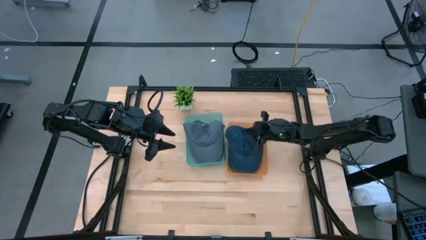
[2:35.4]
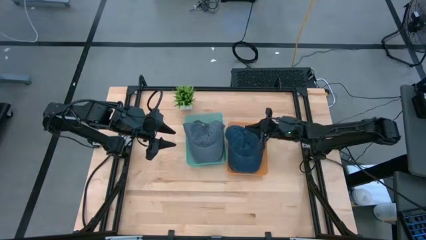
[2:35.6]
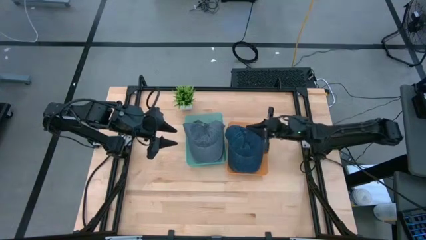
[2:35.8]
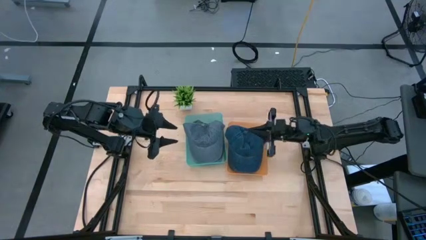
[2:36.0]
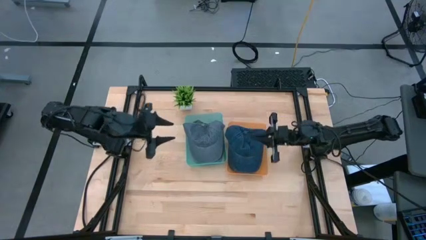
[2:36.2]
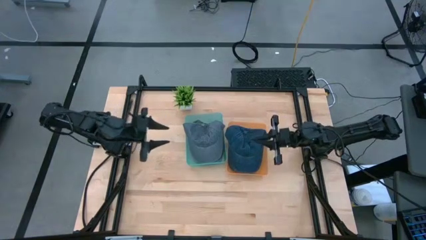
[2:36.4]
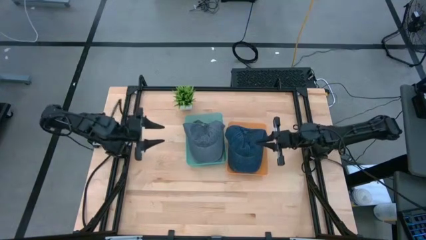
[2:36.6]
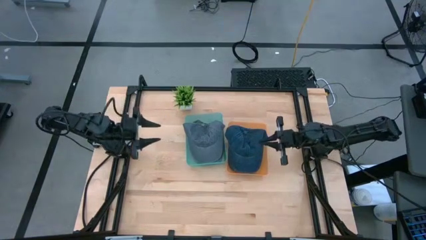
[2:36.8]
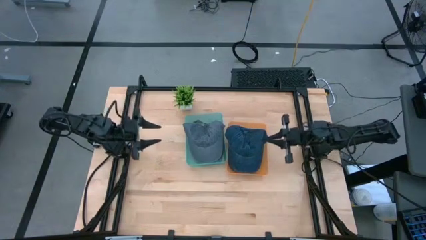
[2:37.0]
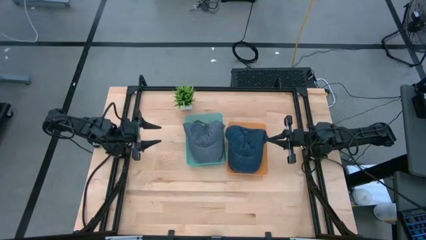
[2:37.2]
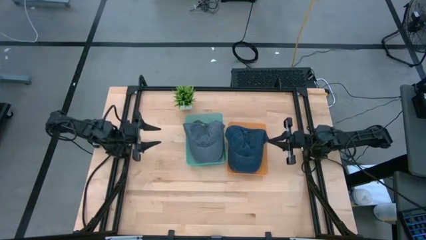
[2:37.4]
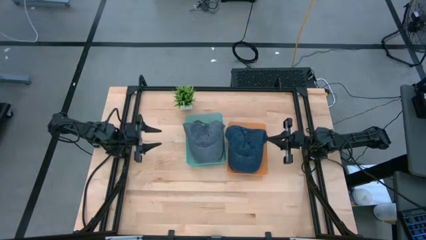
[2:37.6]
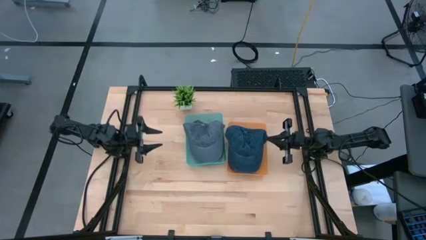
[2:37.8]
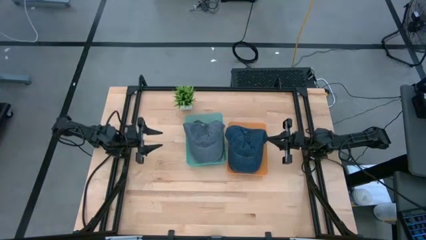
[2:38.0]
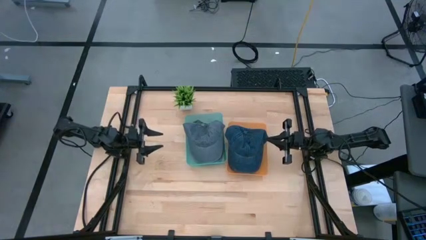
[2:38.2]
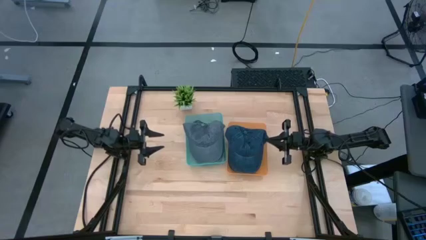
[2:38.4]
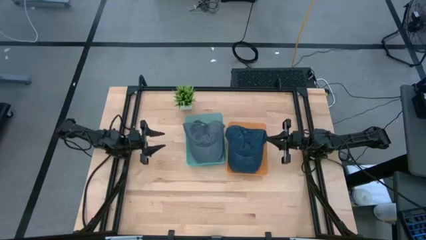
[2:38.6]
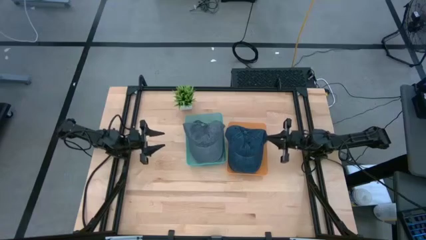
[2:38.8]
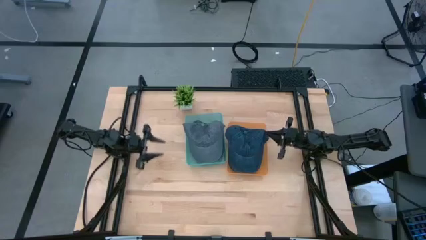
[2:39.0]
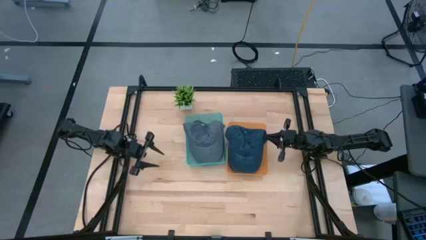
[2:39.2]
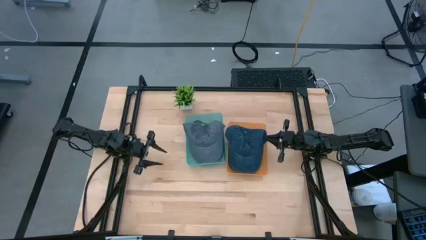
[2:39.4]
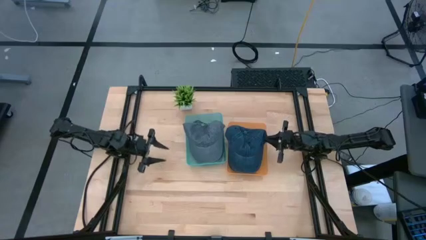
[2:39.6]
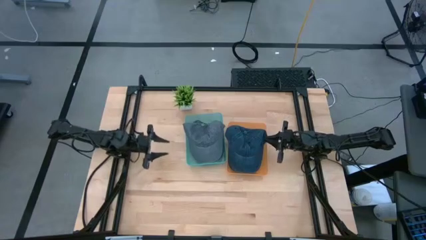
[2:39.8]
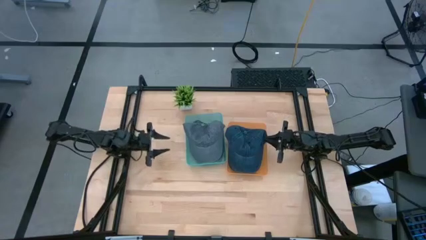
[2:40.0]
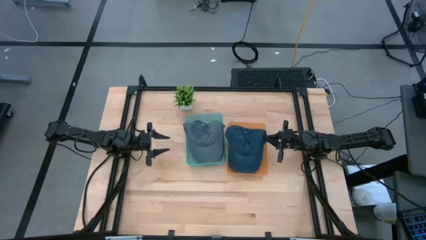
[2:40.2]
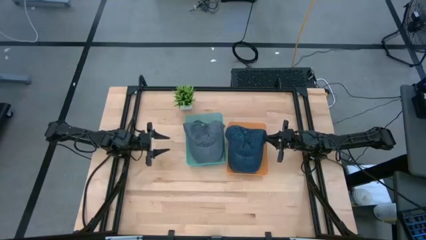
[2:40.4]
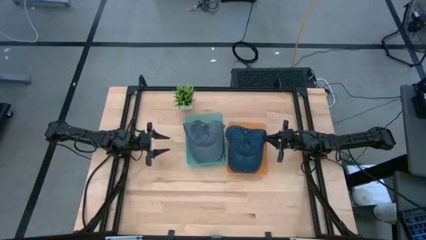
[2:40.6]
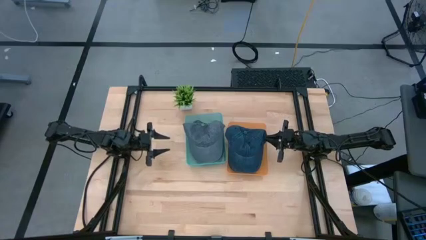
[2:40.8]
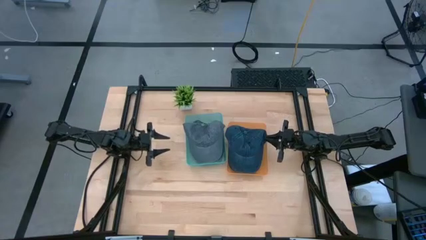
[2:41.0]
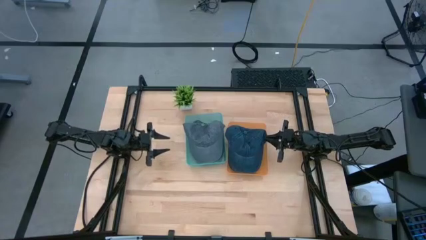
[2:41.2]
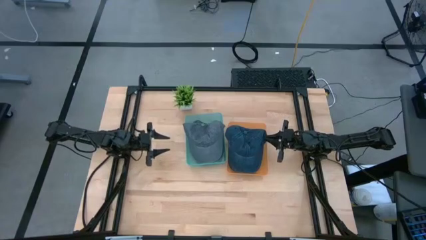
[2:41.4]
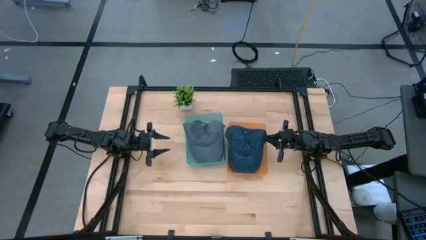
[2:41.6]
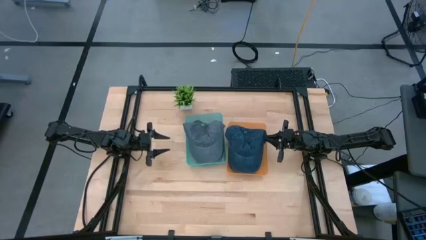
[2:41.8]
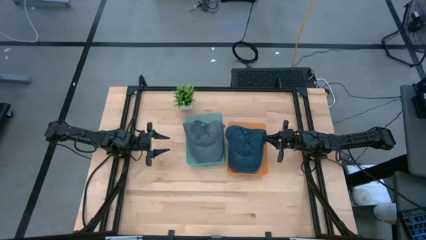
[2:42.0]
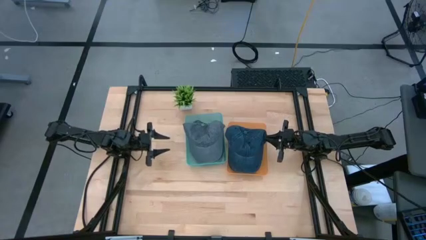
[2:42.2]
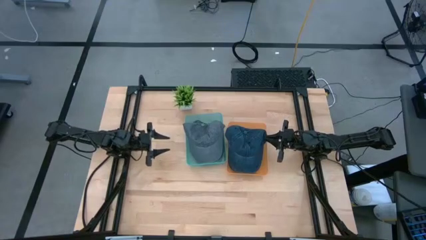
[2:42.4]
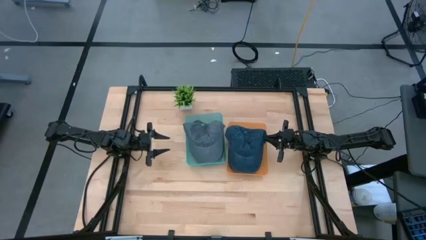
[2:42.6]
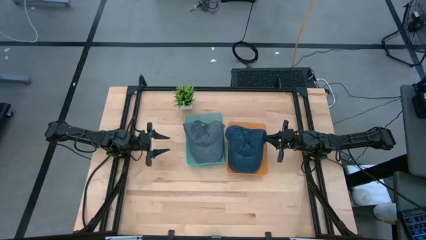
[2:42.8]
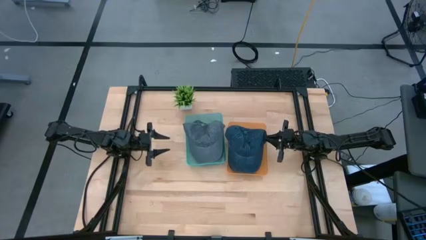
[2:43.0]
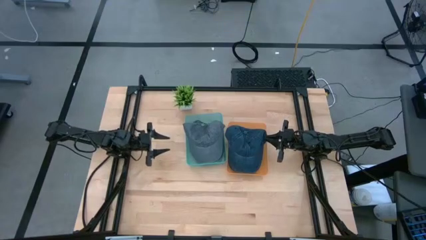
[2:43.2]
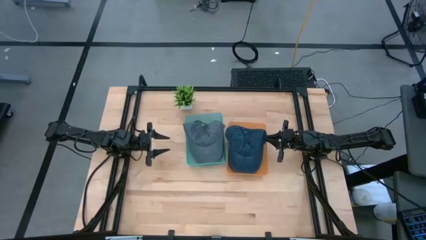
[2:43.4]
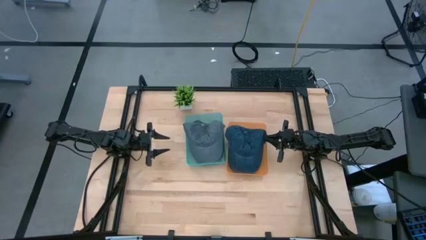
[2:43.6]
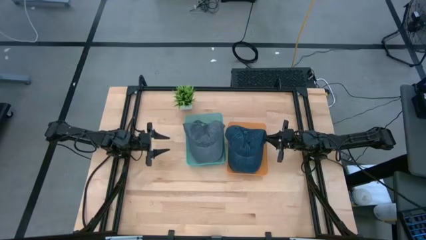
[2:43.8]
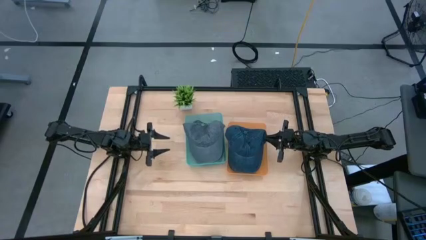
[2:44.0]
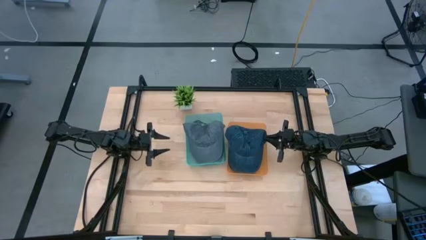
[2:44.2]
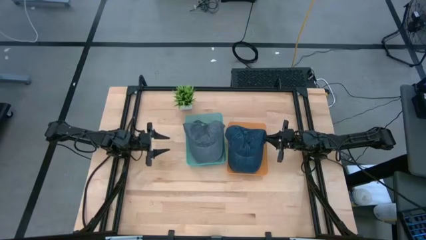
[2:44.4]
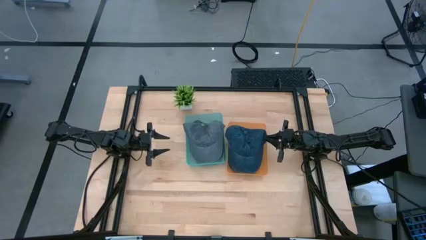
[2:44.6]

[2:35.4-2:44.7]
Task: Pick & Place hat
Return to Home Position

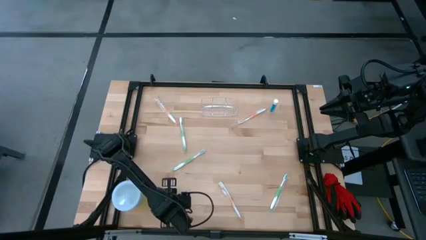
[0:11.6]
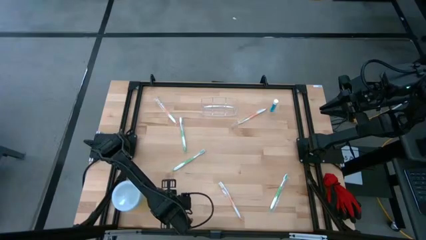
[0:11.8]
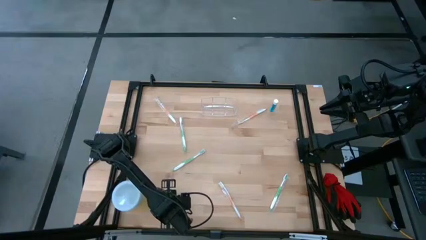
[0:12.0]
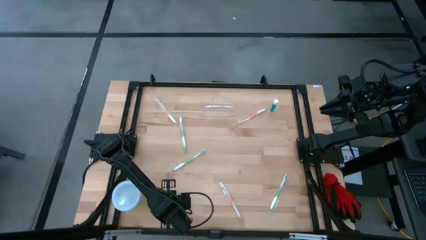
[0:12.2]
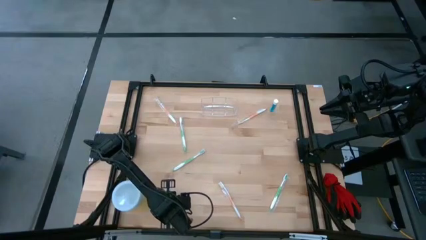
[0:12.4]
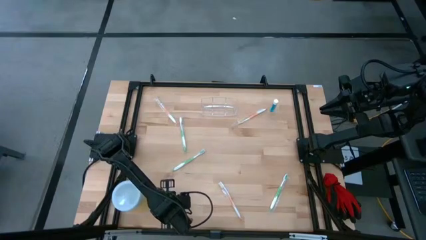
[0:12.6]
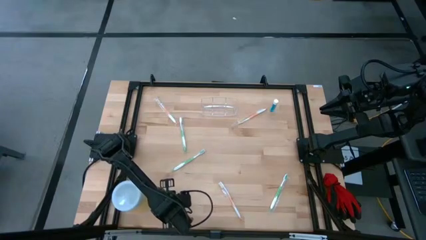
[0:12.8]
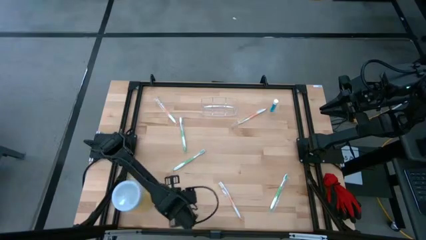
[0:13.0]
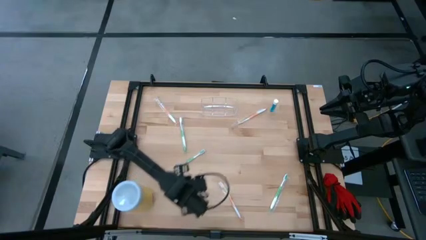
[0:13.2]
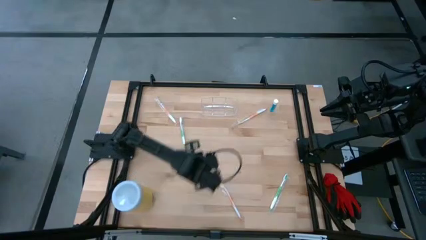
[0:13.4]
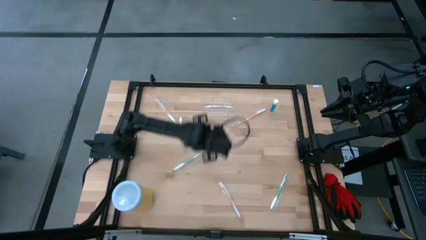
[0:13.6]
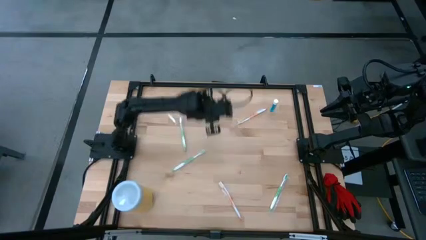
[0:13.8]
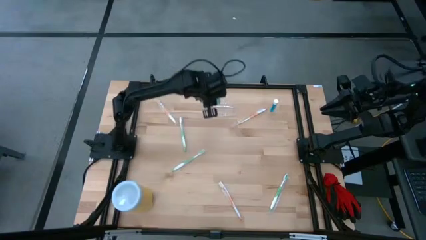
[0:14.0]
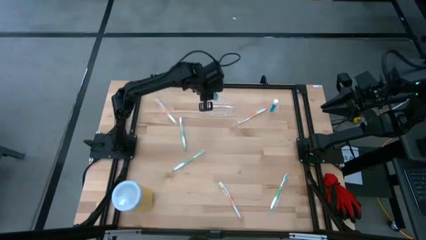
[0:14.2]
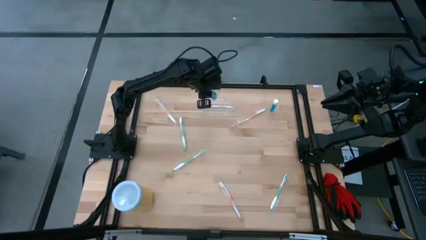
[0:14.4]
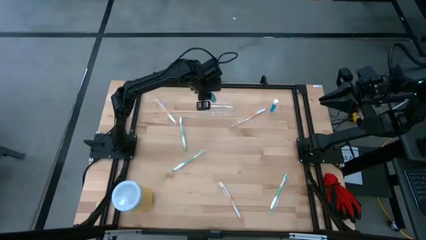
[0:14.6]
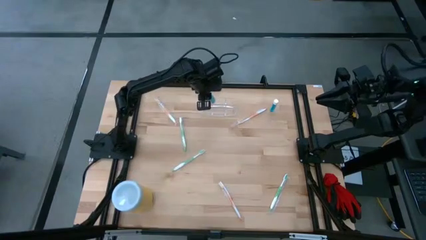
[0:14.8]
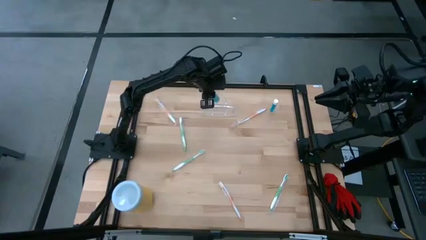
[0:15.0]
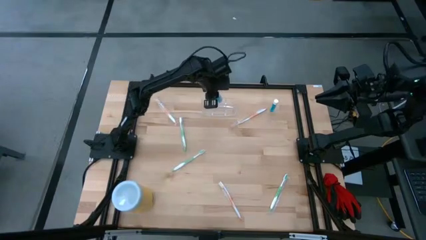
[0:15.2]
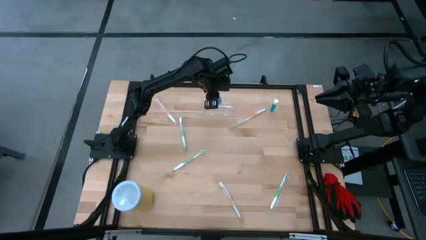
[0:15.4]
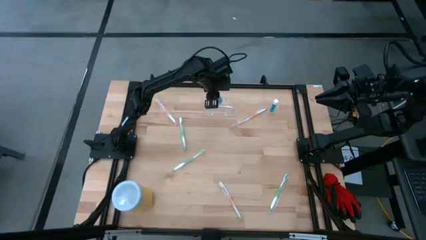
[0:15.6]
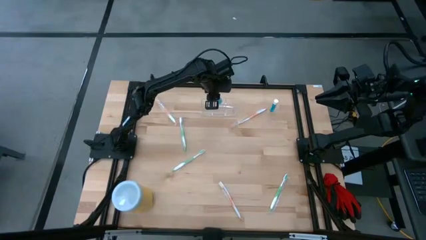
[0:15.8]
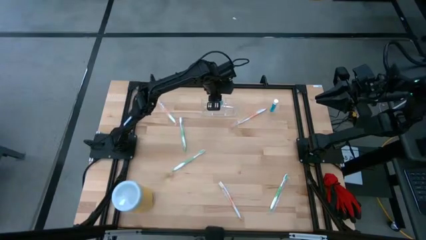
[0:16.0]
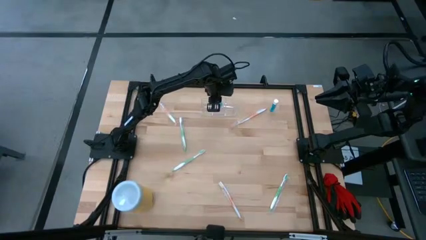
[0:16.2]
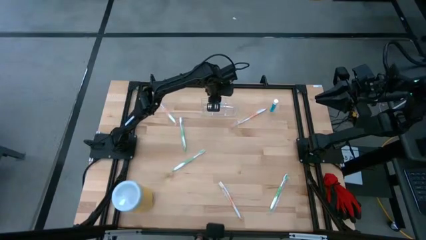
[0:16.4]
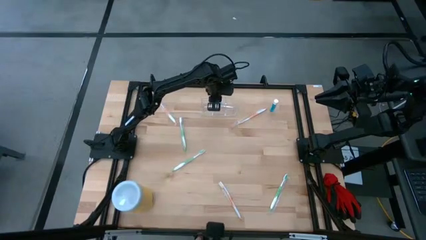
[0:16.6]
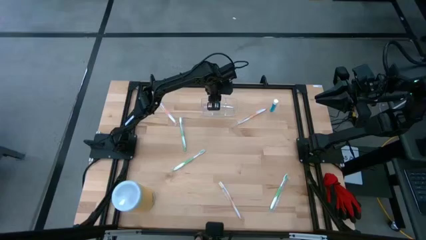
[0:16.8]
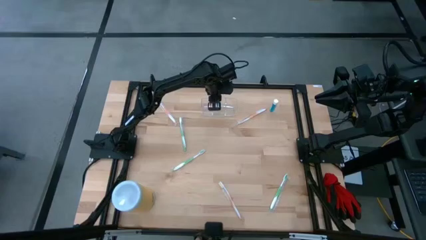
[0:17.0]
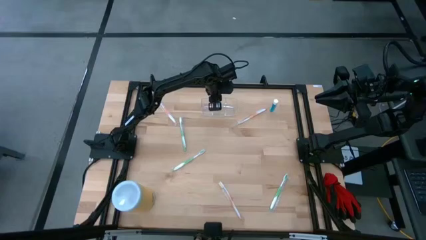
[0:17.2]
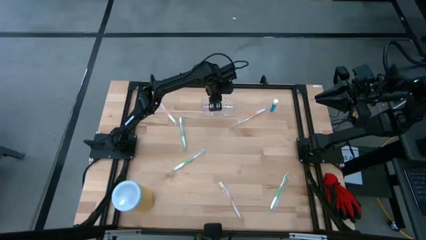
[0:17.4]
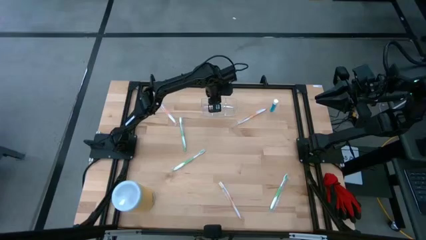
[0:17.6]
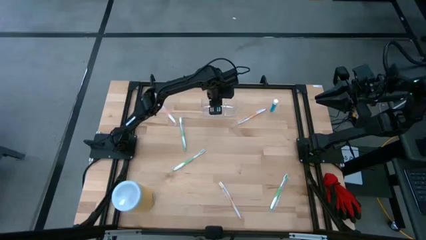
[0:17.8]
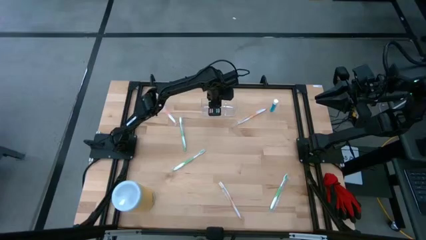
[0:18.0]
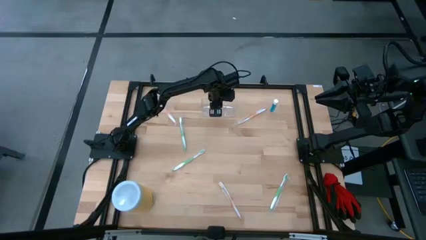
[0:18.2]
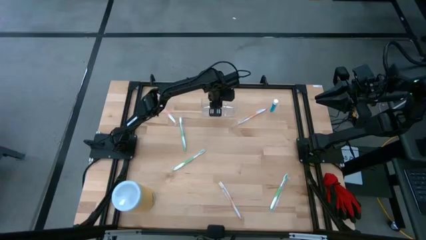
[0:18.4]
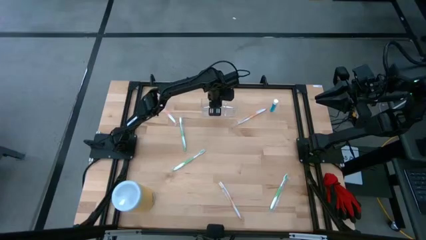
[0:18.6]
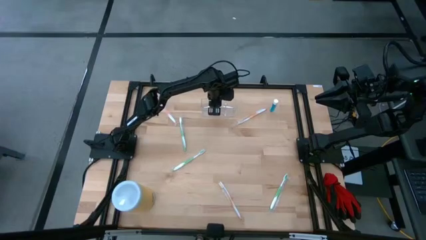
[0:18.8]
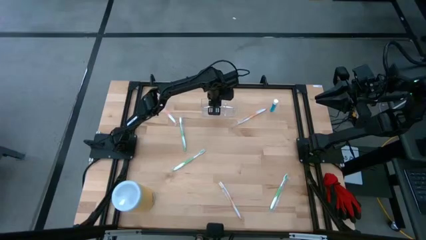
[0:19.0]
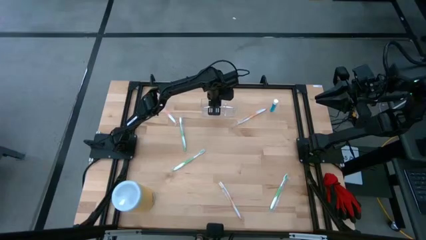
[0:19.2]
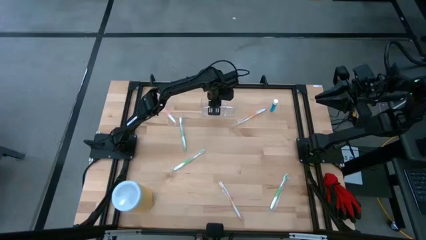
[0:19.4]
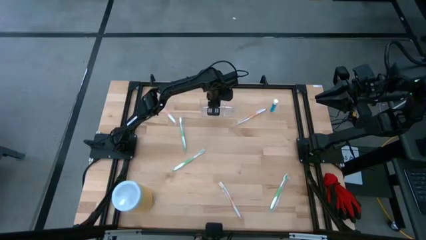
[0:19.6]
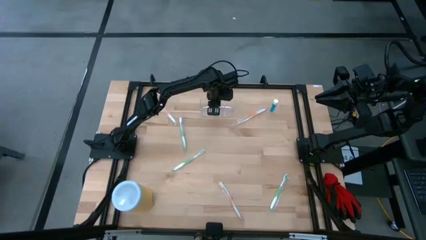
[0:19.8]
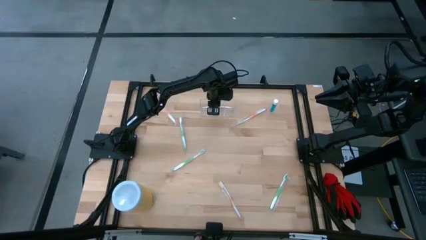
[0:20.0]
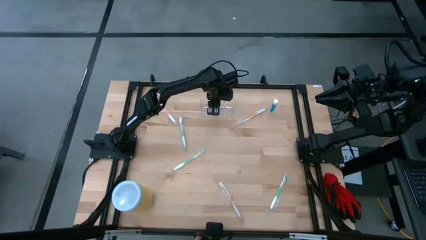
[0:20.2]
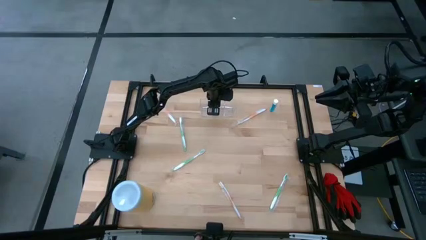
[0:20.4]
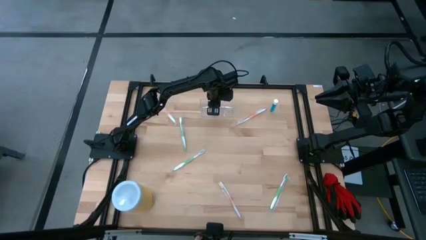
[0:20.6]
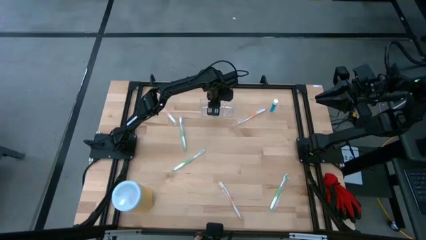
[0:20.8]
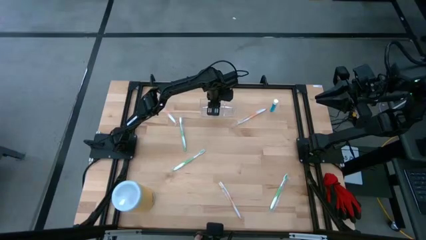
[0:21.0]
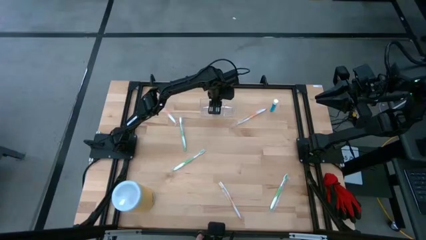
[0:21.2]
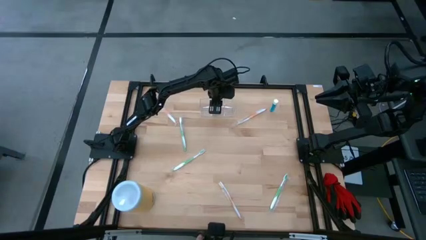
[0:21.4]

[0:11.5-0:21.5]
Task: Pick & Place toothbrushing station
Put the bottom blue mouthwash into the transparent organizer
